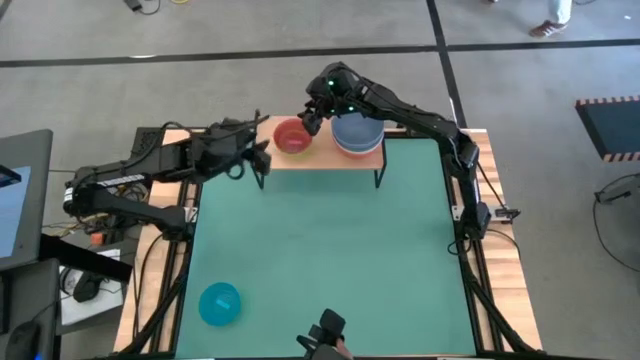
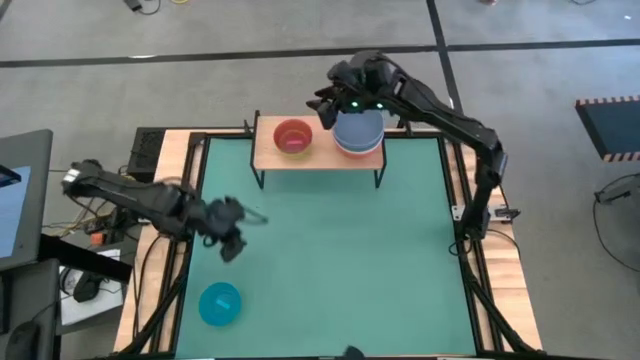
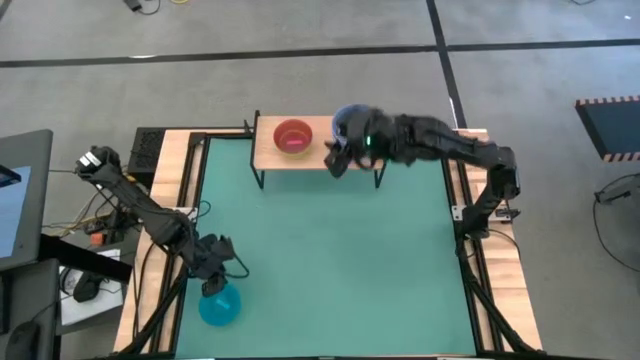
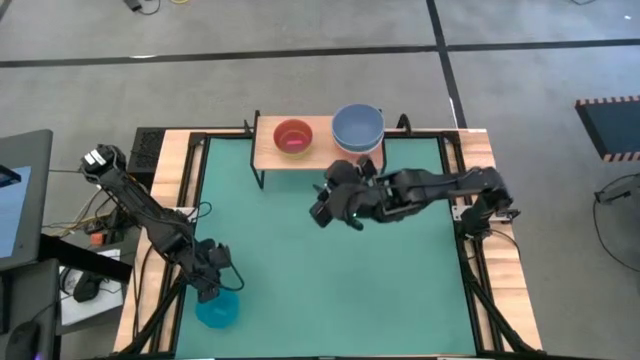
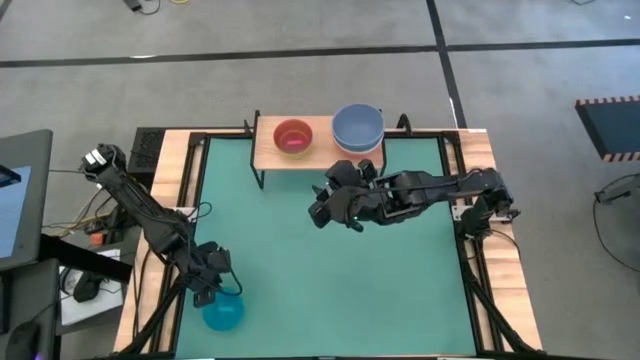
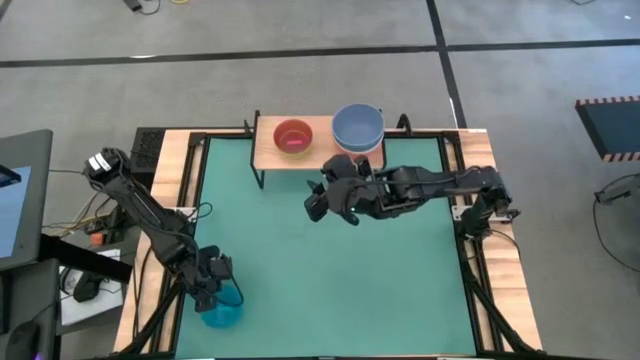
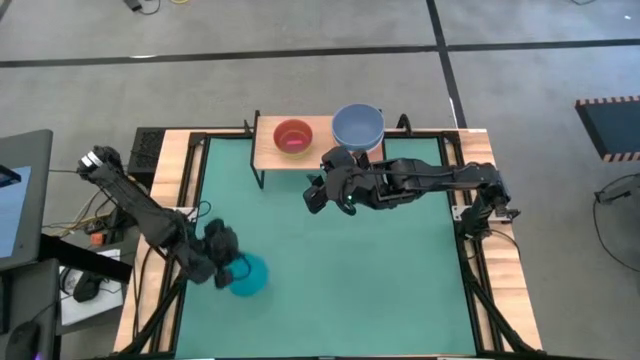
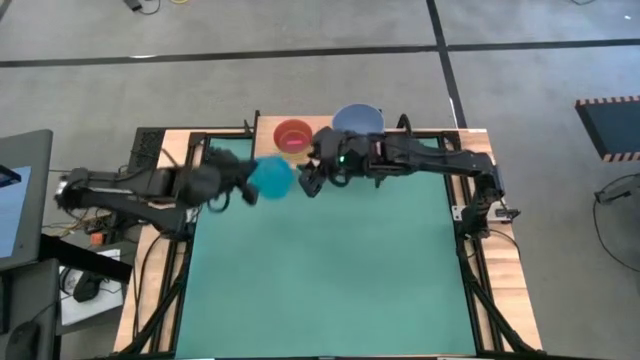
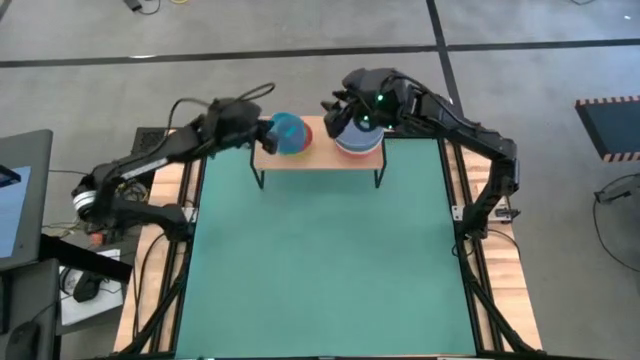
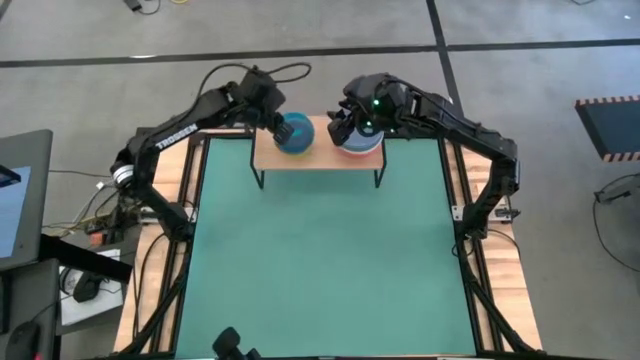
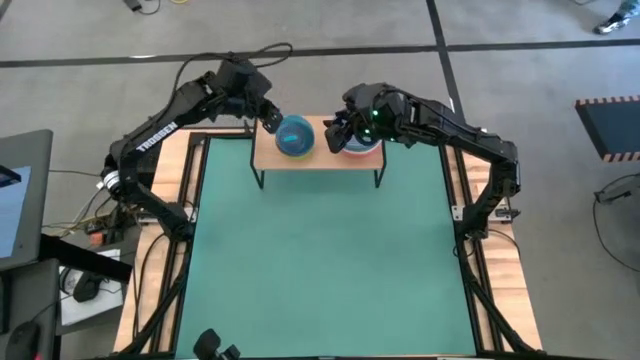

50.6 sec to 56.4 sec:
Task: Place and stack bowls onto a shelf
Stack the blue bowl on the red bowl on the shelf

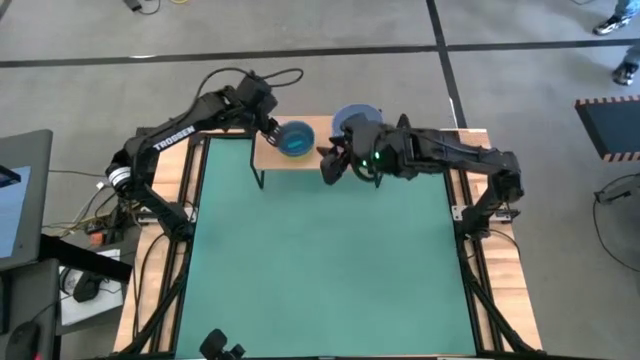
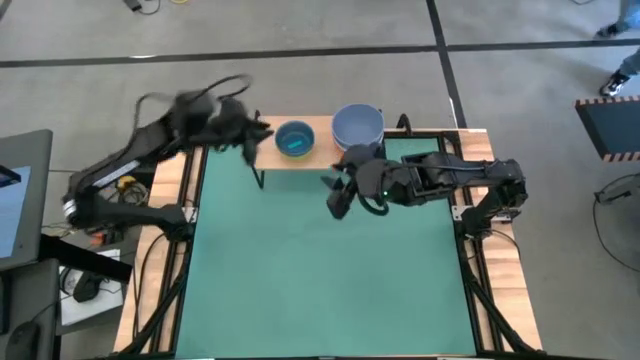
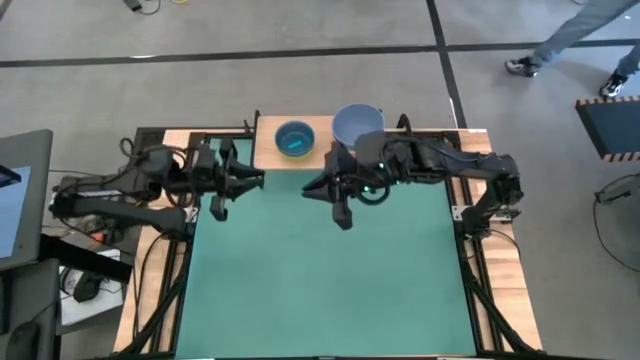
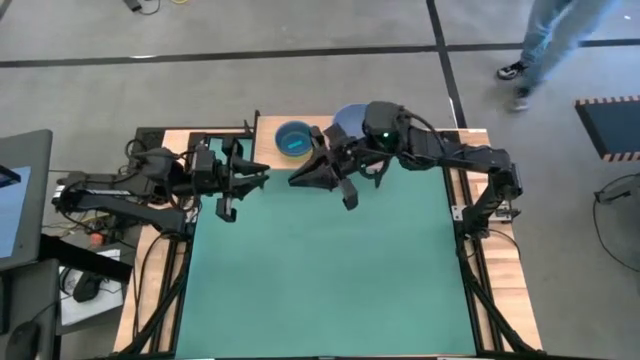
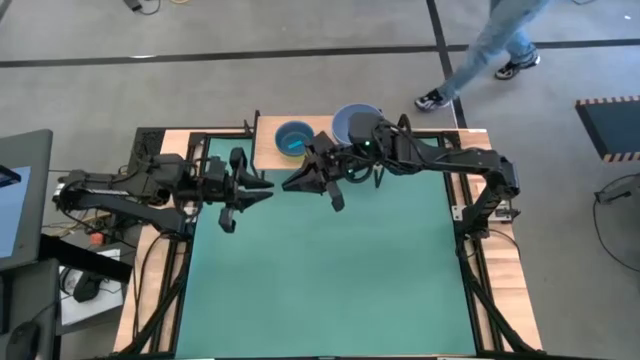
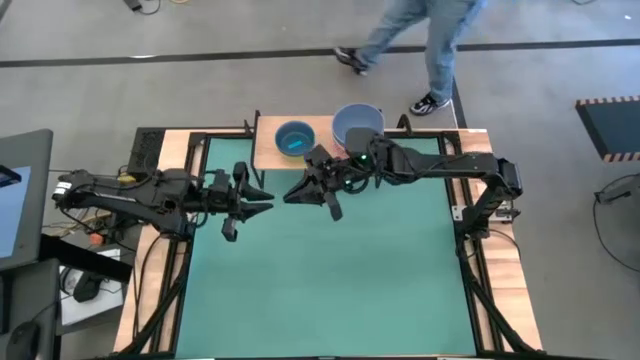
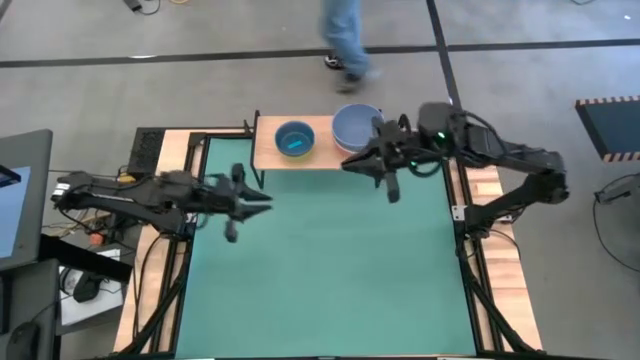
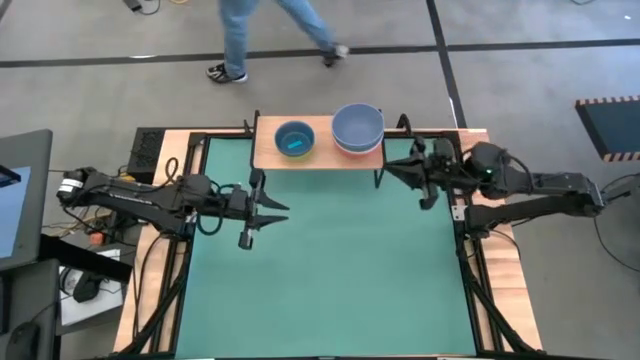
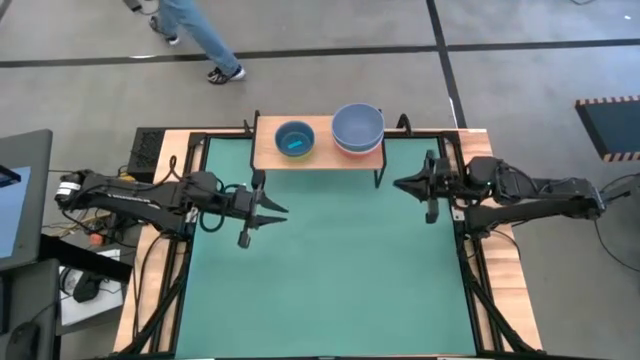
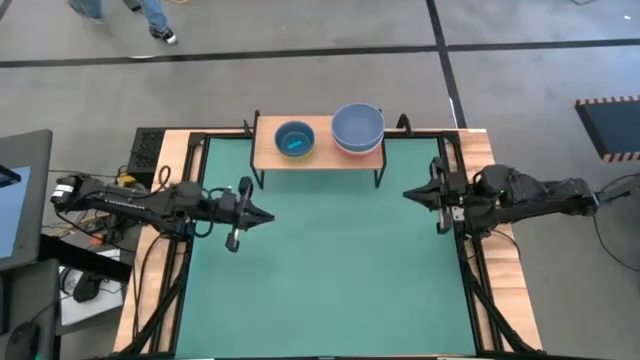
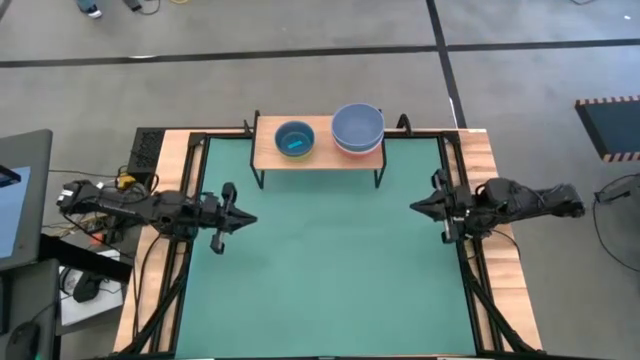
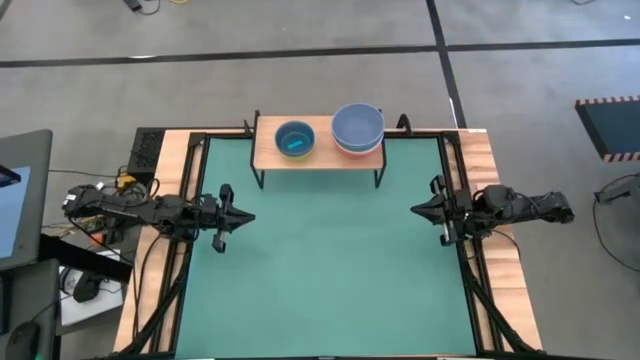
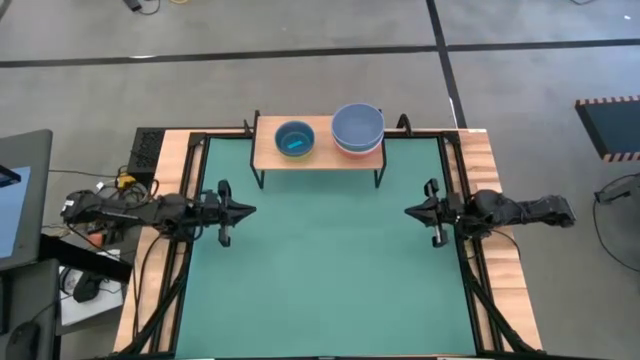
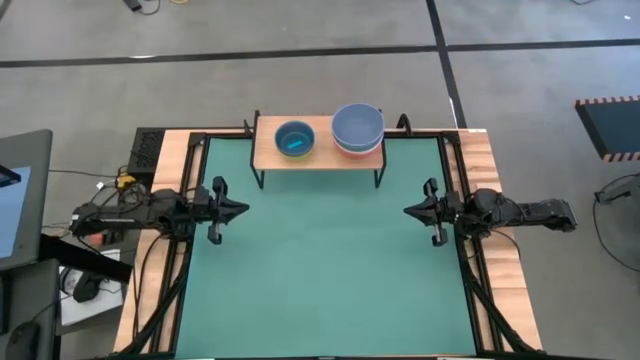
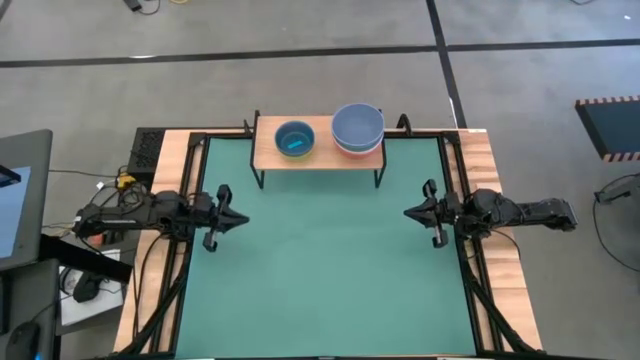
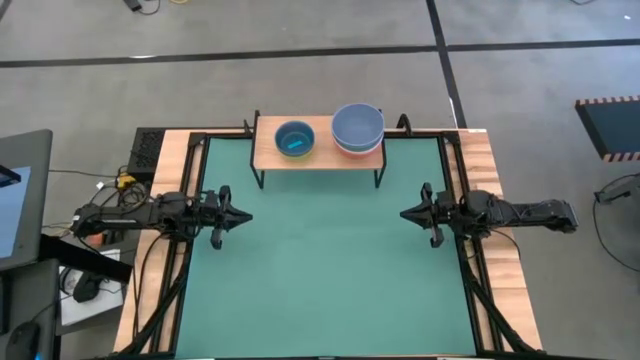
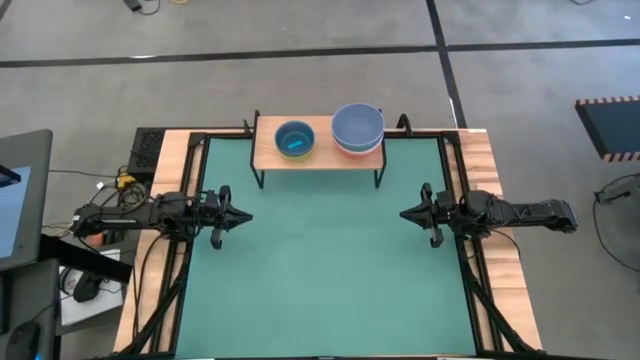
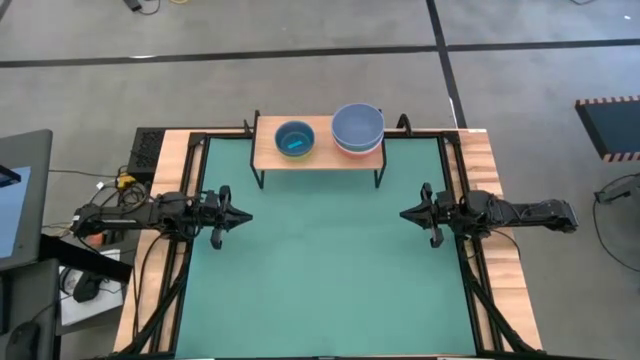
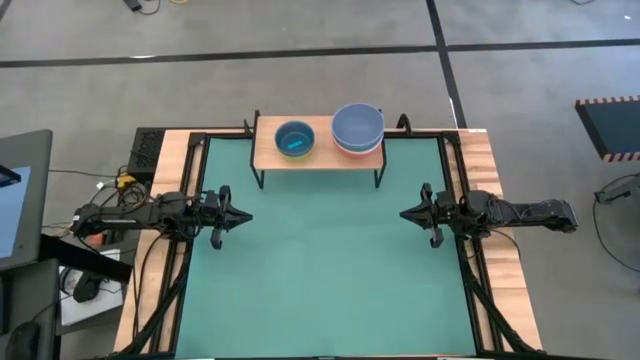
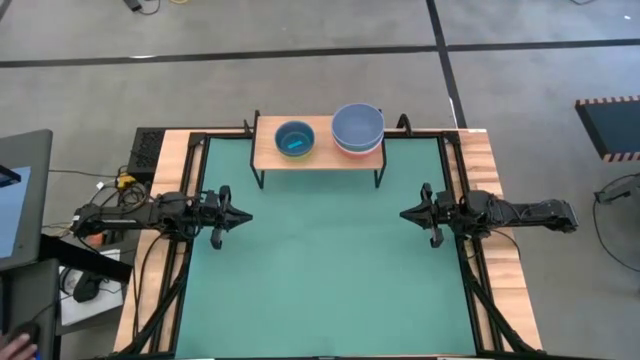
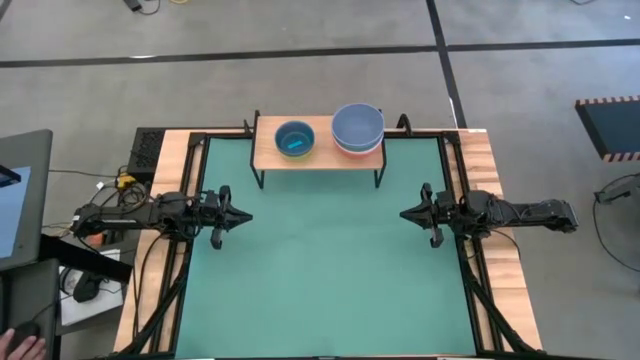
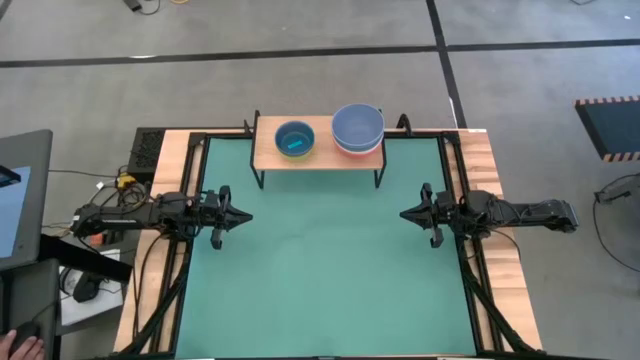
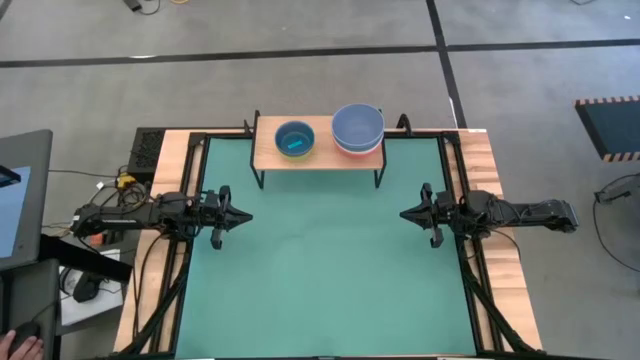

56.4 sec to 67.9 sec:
Return to Home Position

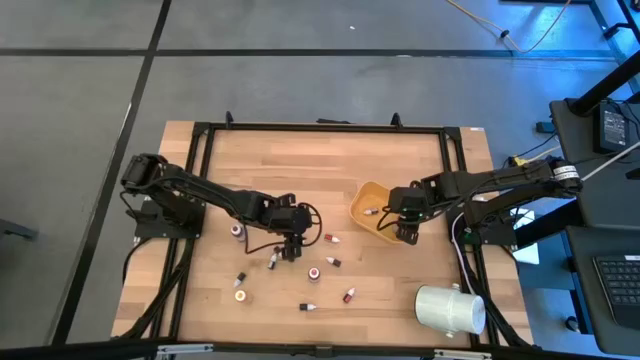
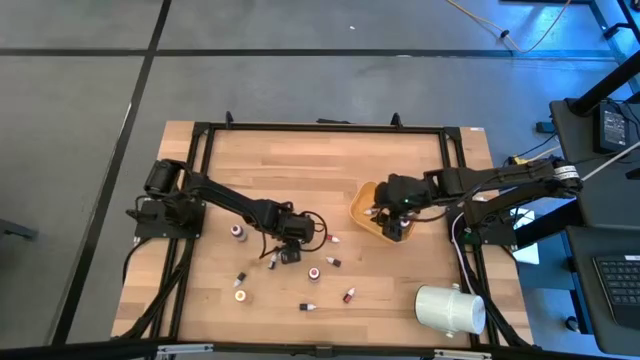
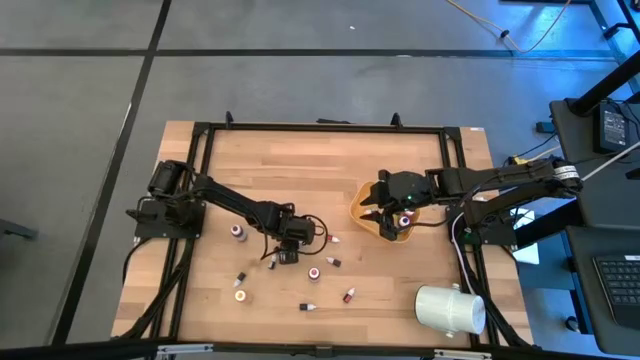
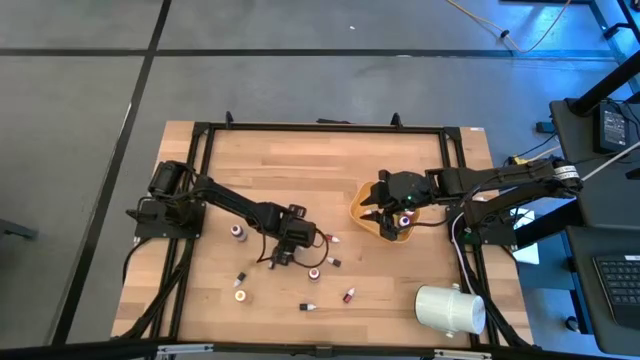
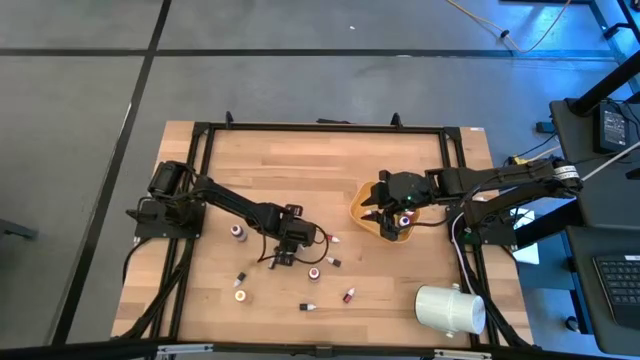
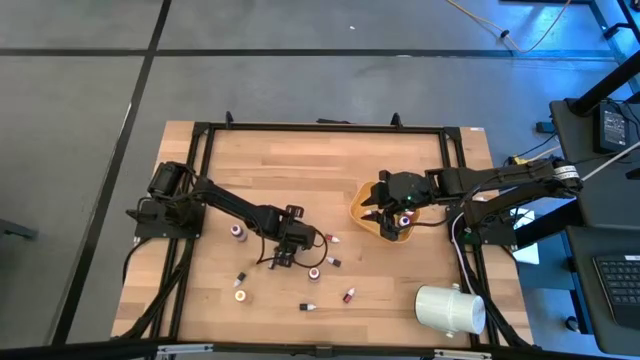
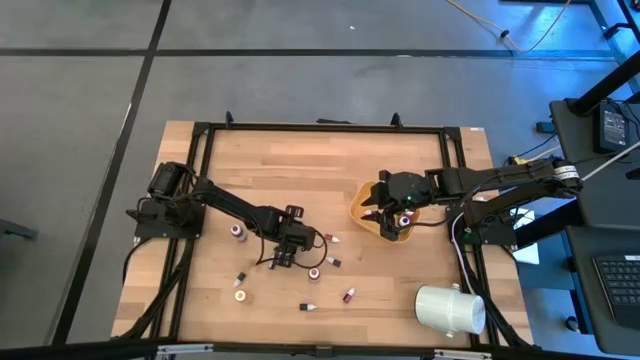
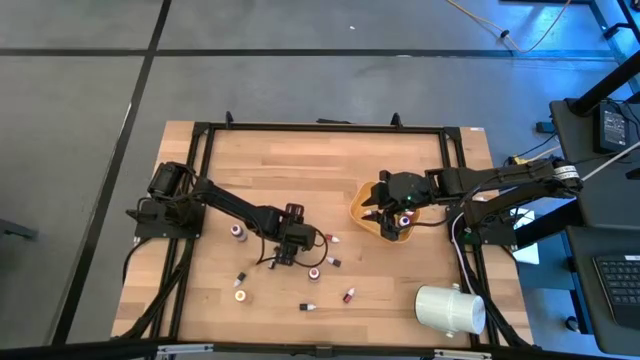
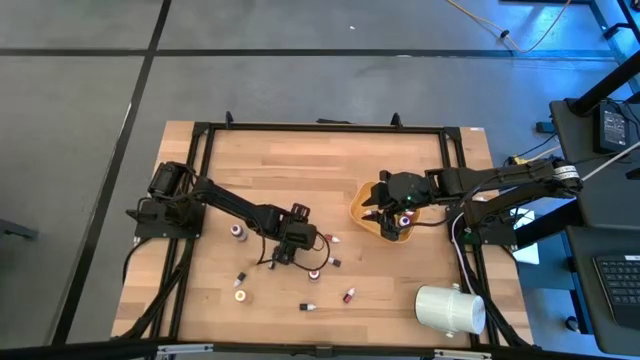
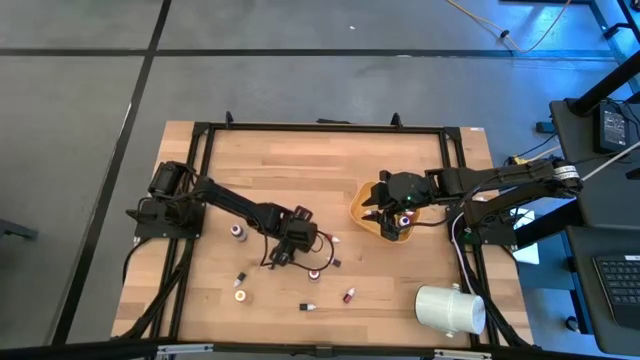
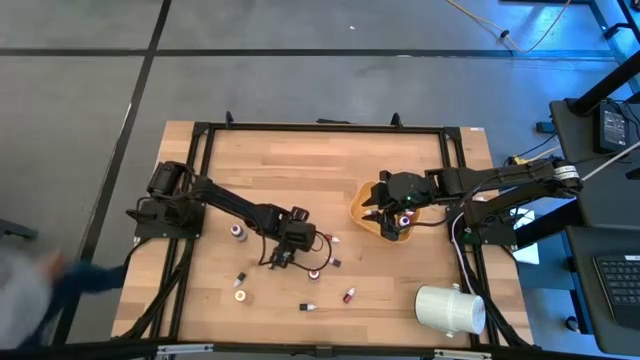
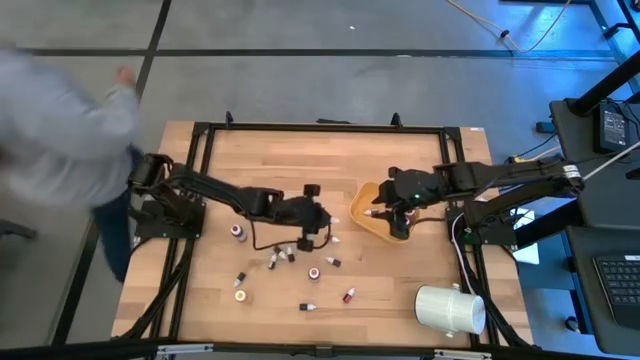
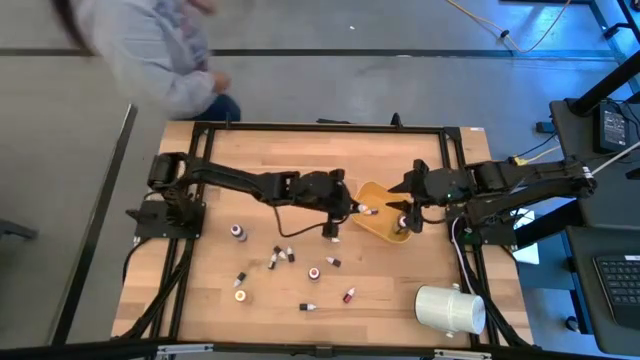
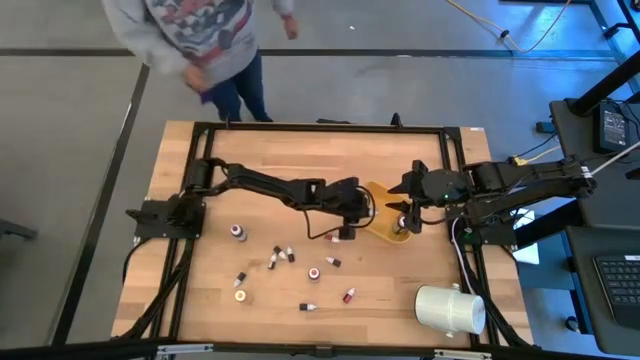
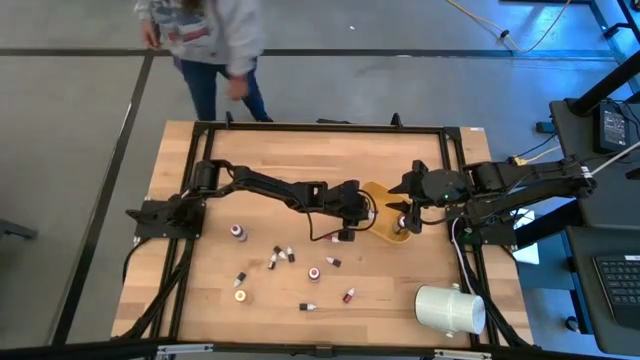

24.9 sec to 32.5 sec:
Task: Pick & Place food coloring
Put the small green food coloring bottle in the yellow bin
